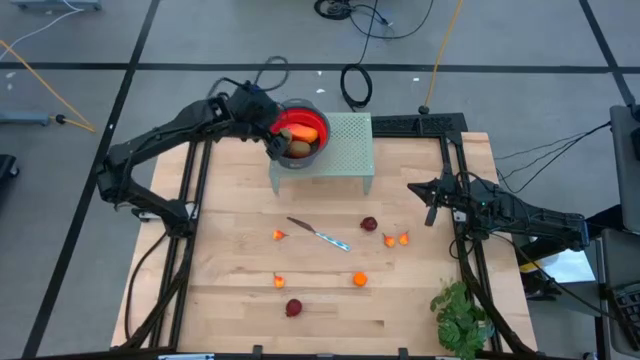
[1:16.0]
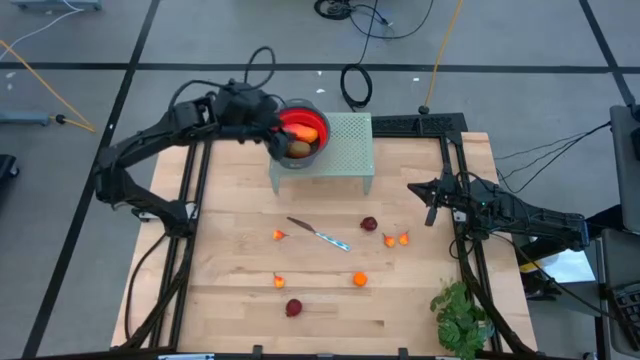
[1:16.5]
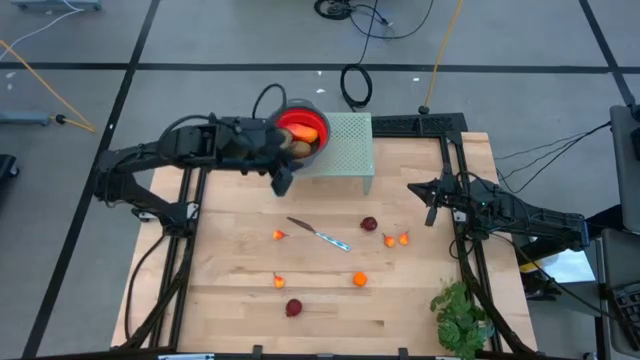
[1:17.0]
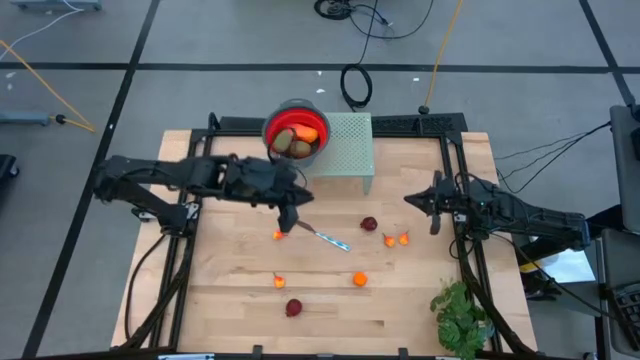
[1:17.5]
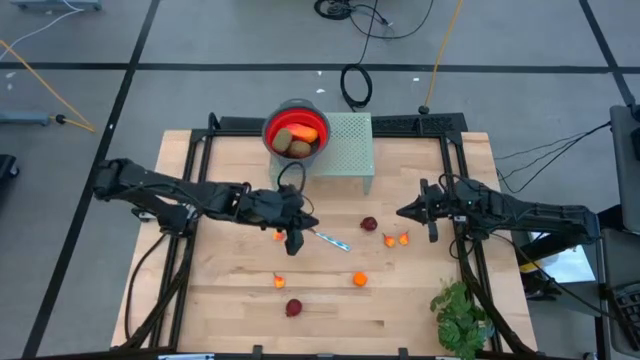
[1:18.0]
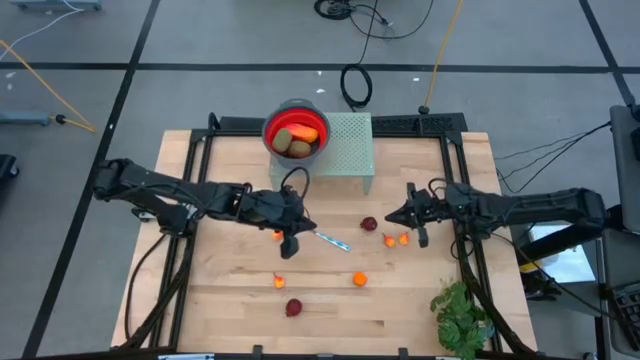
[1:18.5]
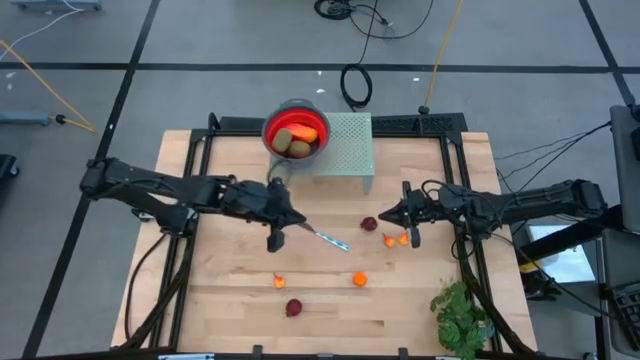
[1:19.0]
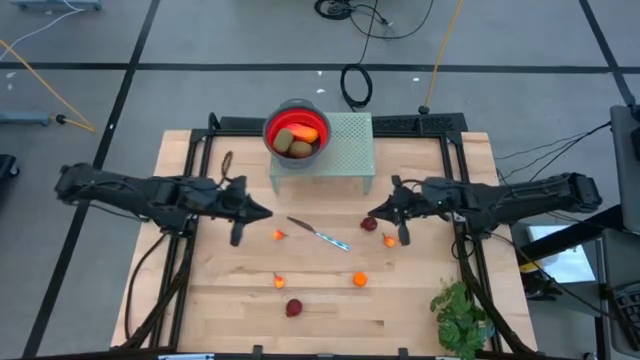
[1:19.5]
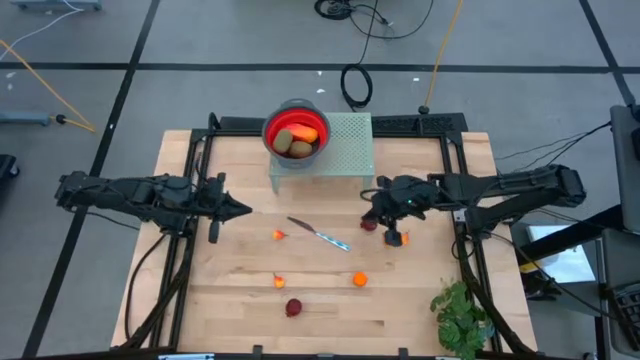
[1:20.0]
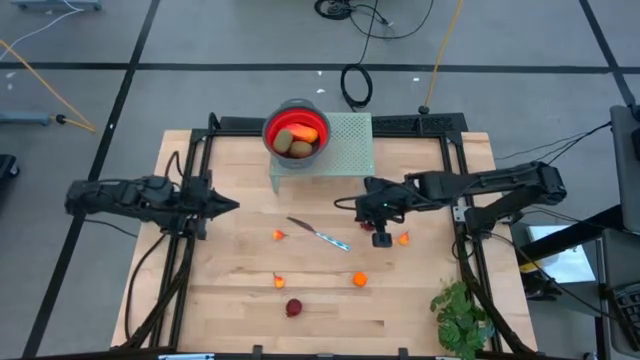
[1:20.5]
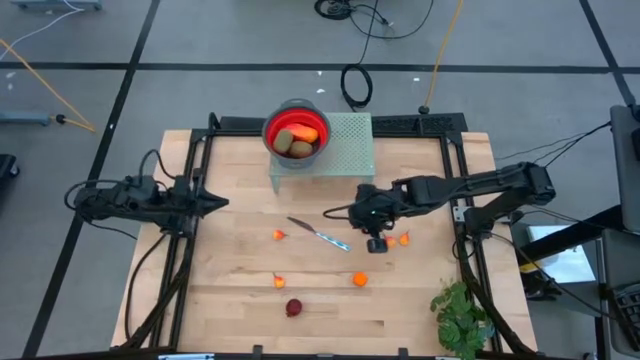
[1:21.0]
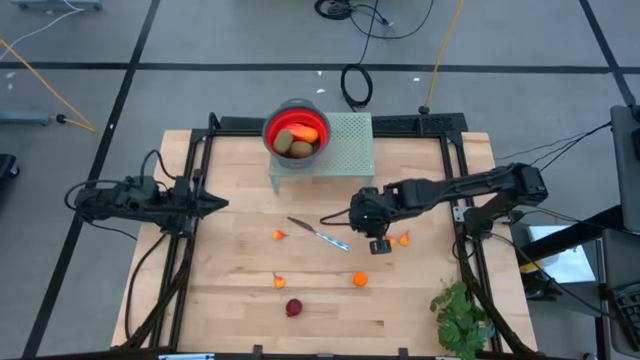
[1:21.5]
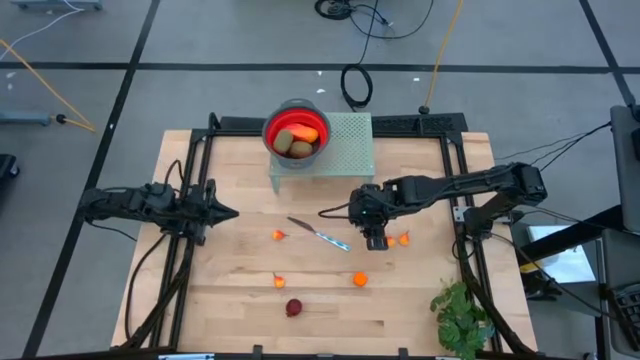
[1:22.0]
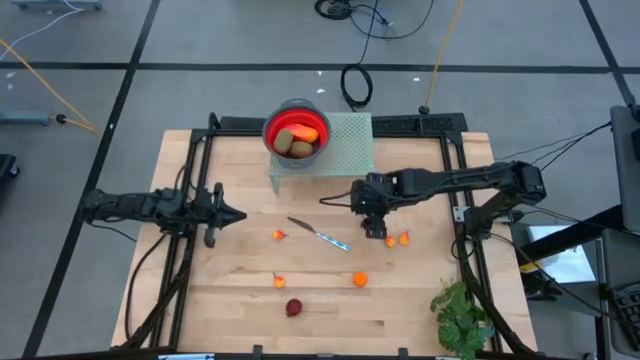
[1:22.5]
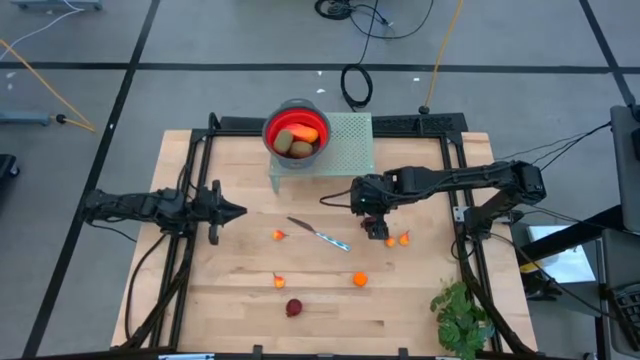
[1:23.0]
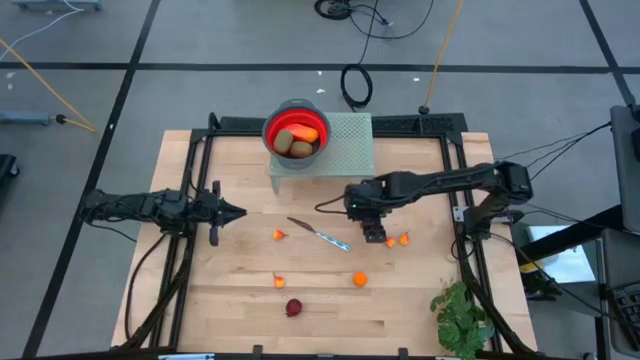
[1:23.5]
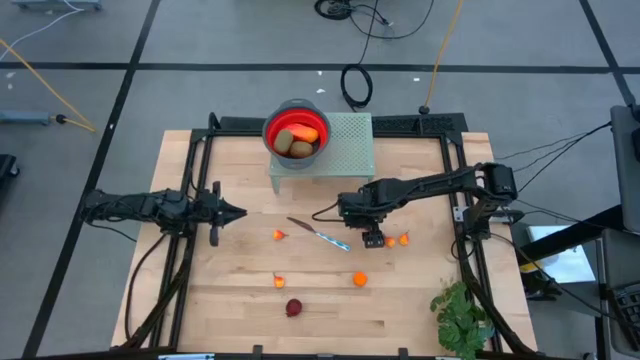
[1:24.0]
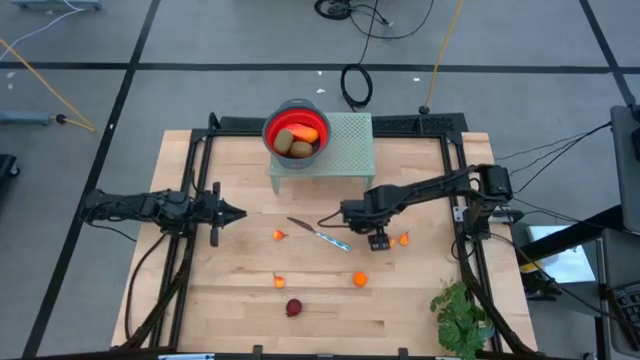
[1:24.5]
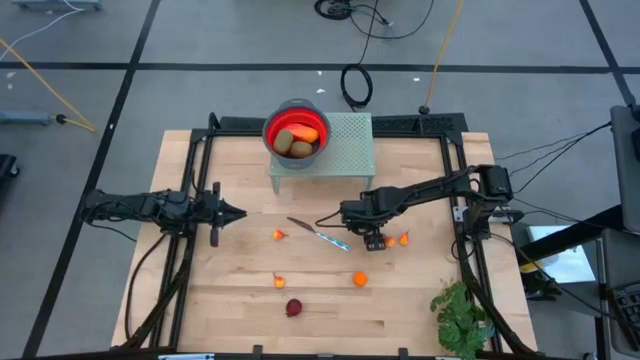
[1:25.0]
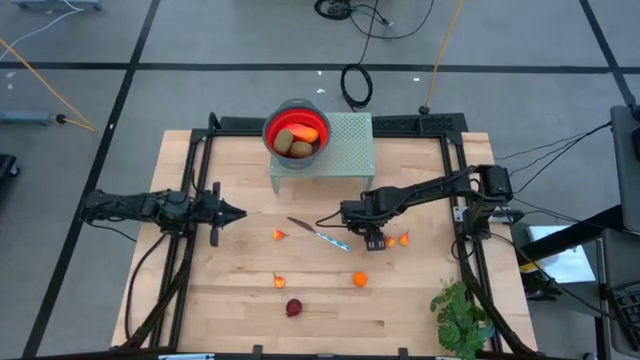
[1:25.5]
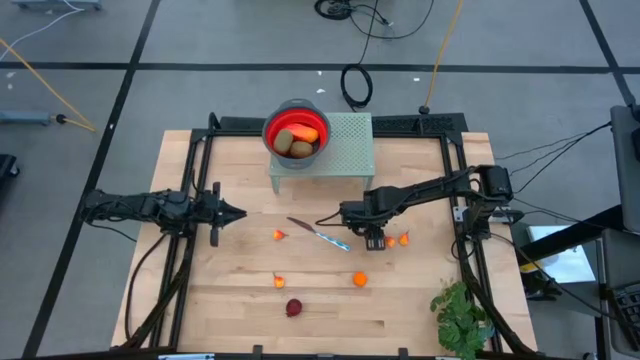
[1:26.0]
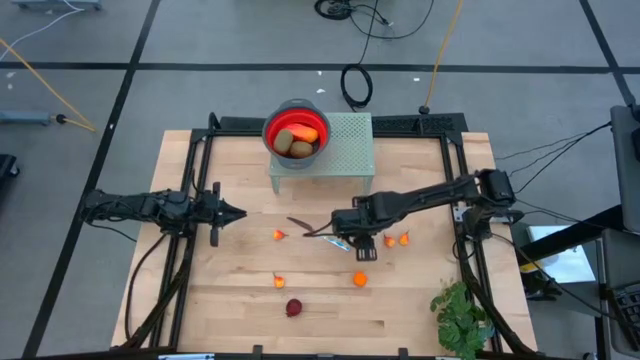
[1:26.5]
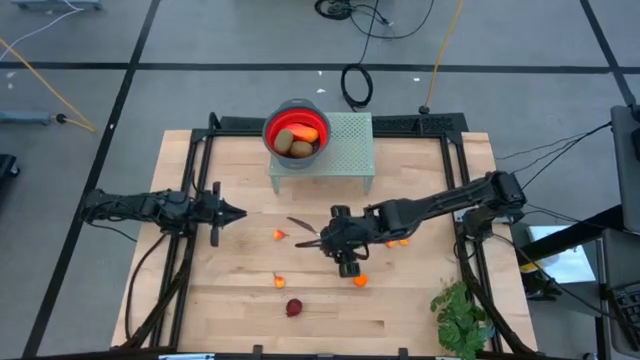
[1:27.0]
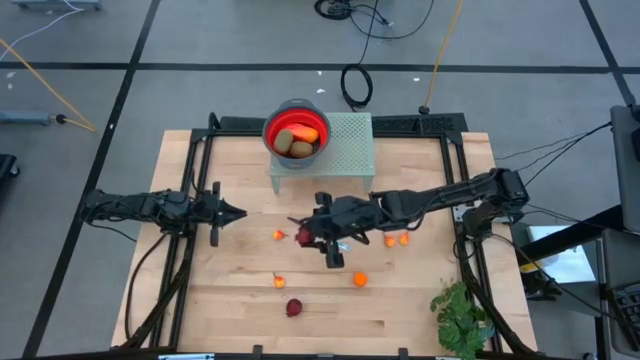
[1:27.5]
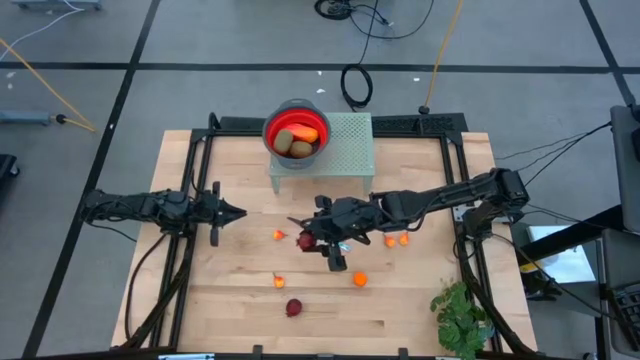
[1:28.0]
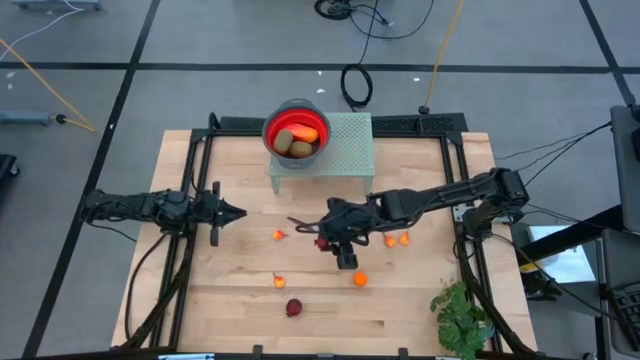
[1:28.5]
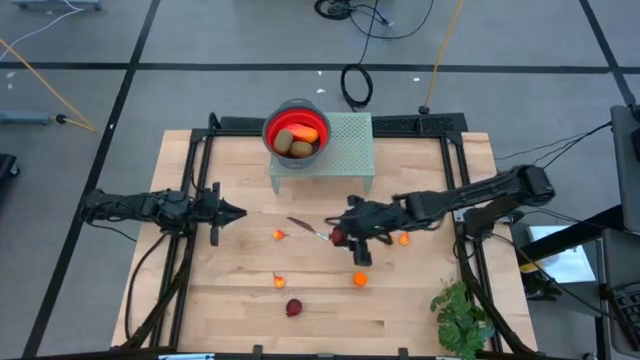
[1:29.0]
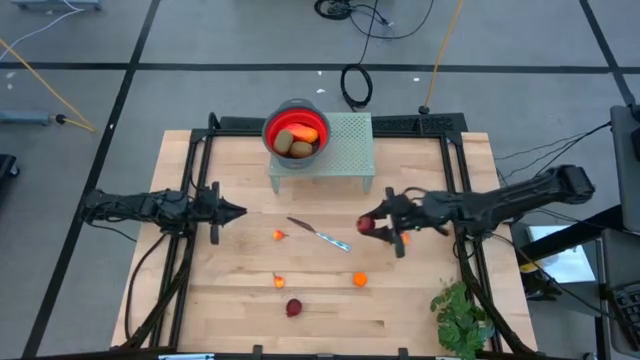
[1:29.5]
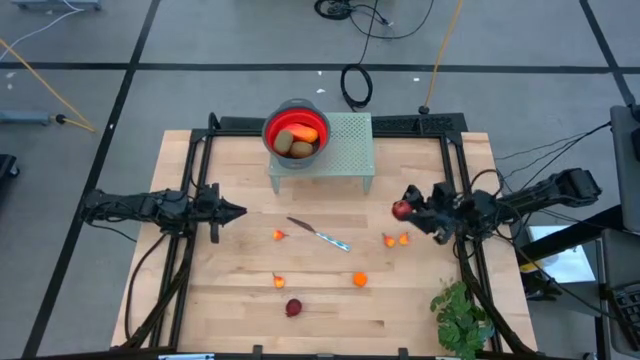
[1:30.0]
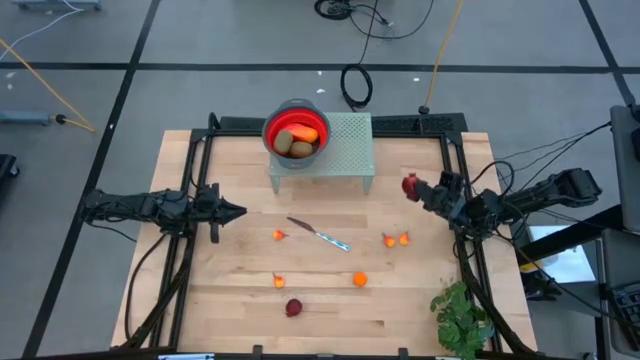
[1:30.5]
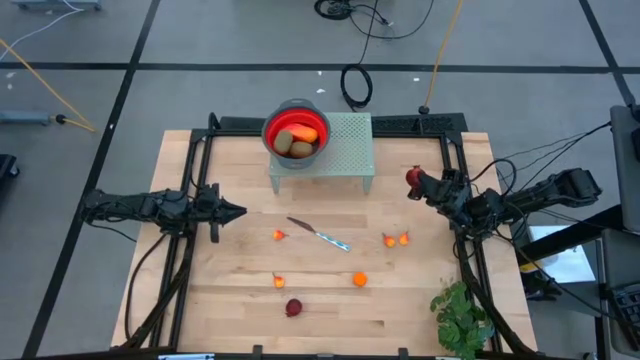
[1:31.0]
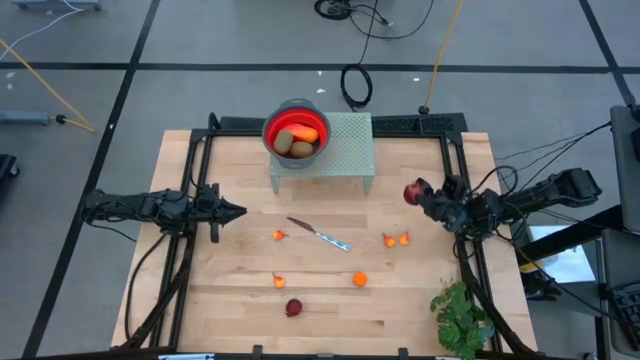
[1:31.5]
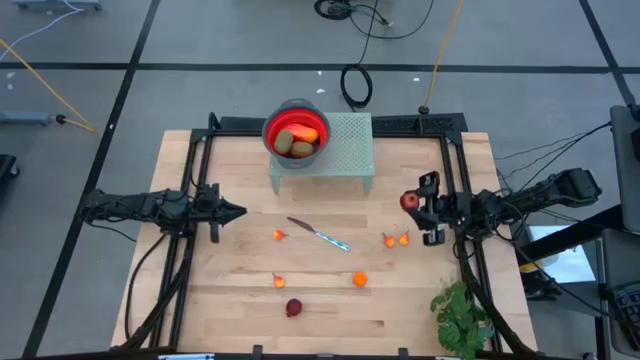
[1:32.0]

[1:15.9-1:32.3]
Task: Pick & Place Fruit
Put the pomegranate into the red strainer bowl

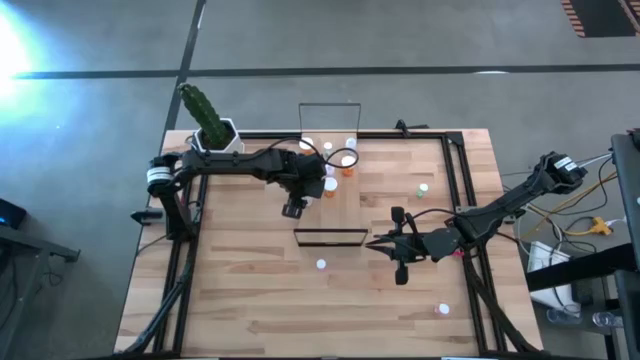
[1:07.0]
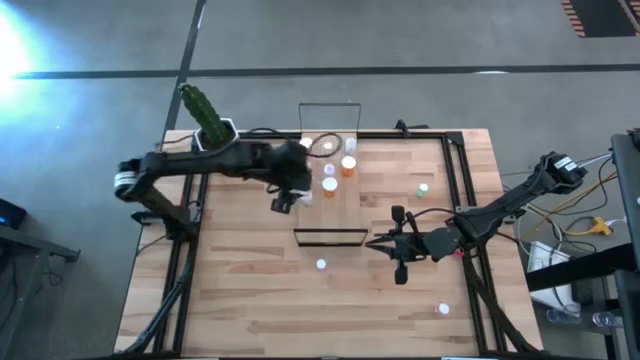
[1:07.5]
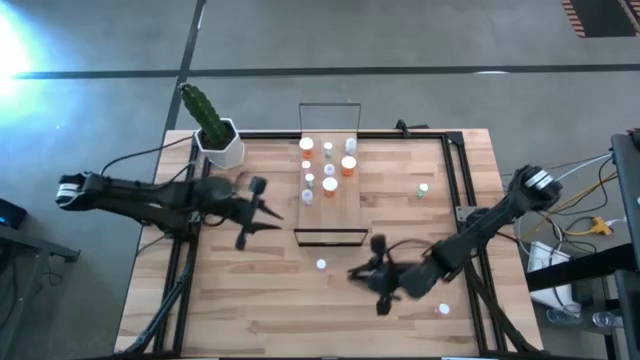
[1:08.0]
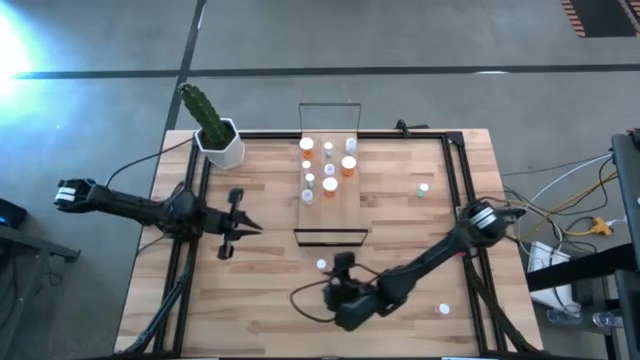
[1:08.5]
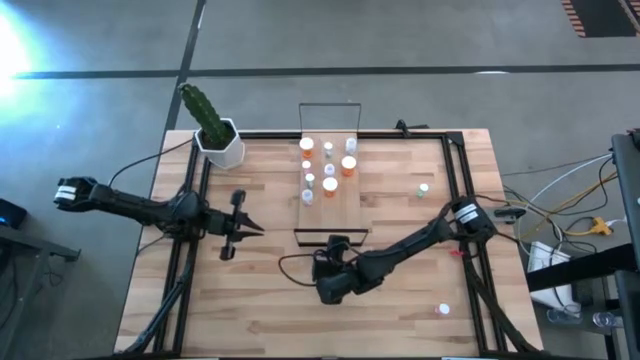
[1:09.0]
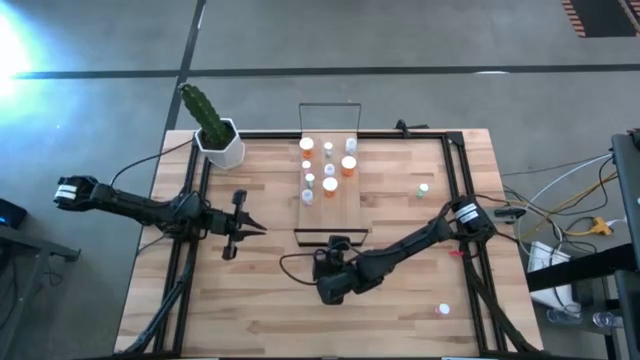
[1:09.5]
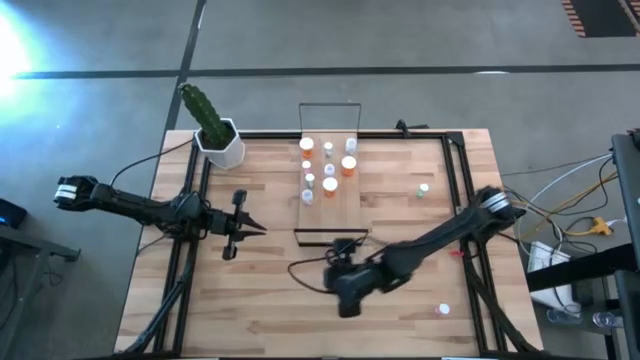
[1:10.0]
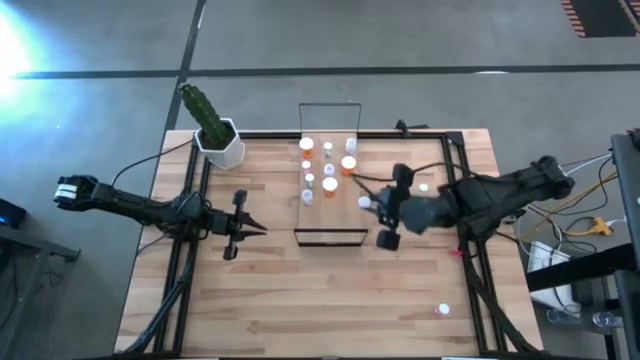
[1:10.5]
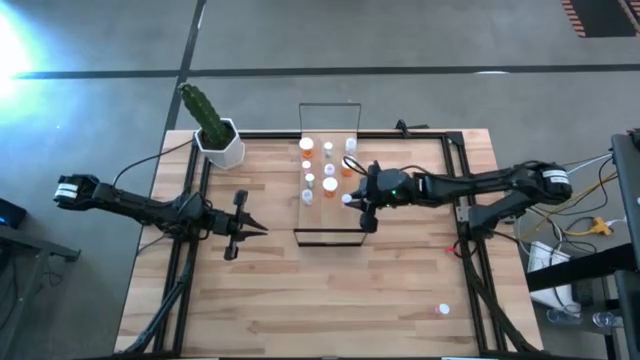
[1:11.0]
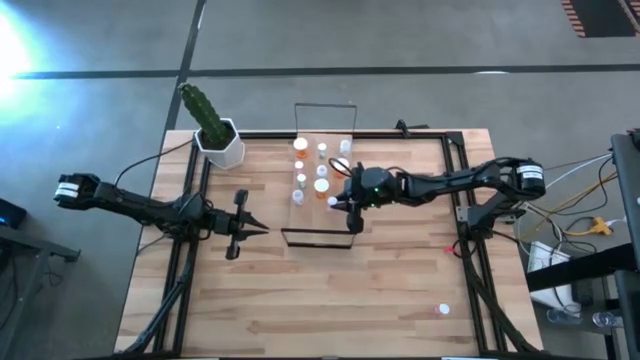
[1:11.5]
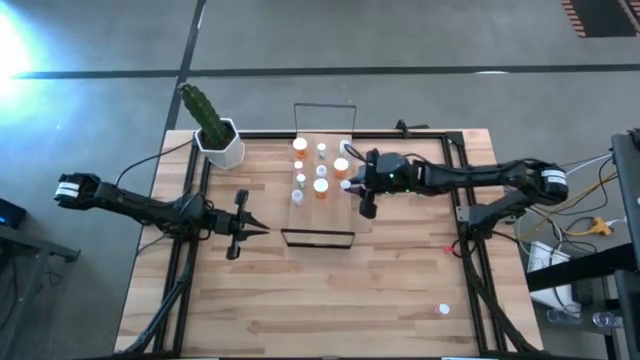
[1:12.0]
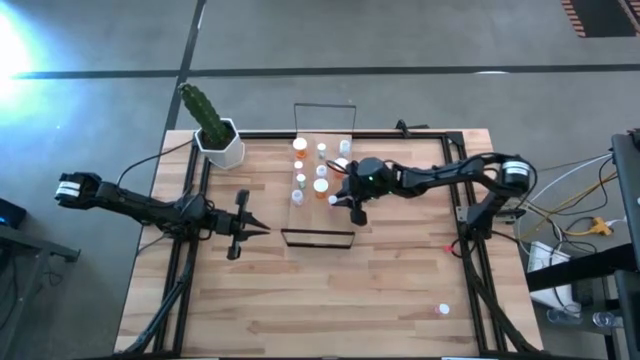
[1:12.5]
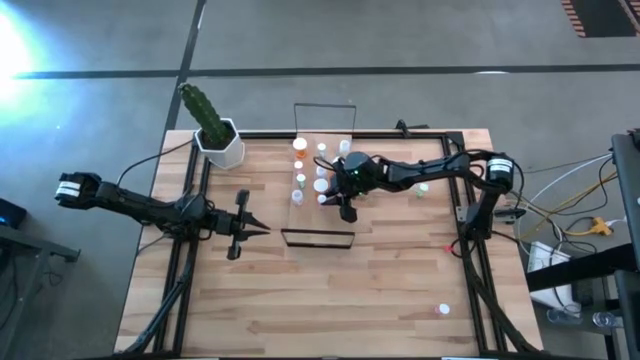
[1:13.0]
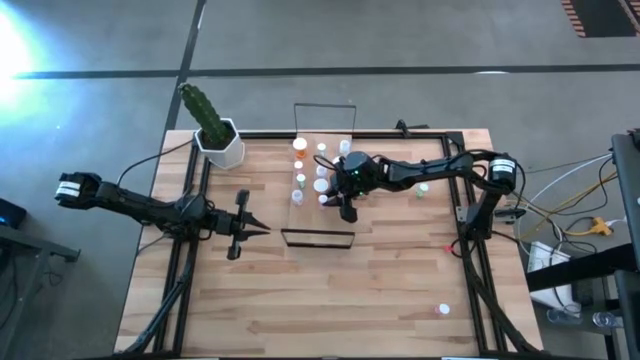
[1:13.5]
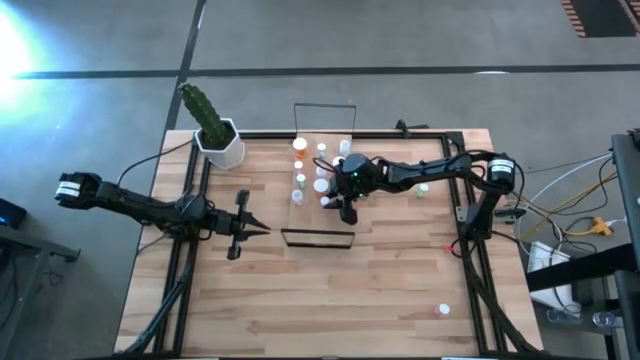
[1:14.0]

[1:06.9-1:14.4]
Task: Pick and place medicine bottles onto shelf by color
Put the left pink transparent pill bottle on the shelf
